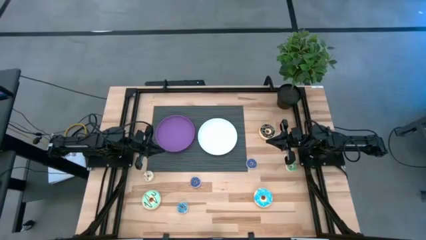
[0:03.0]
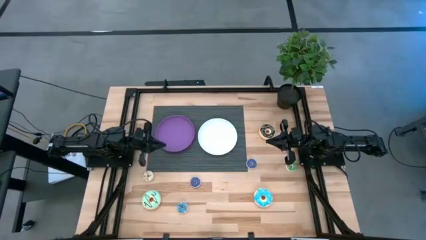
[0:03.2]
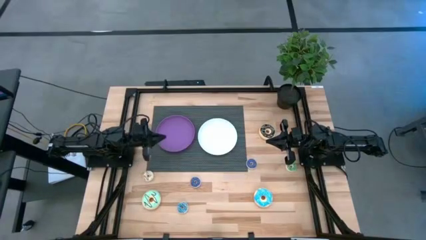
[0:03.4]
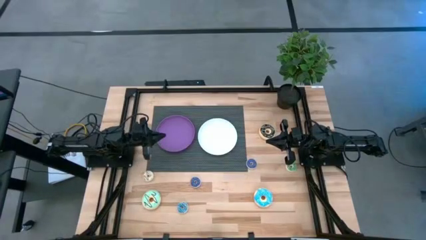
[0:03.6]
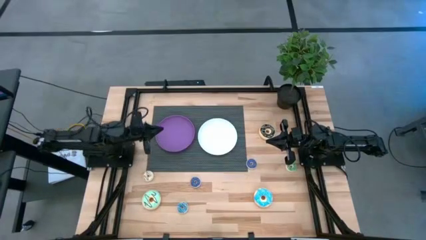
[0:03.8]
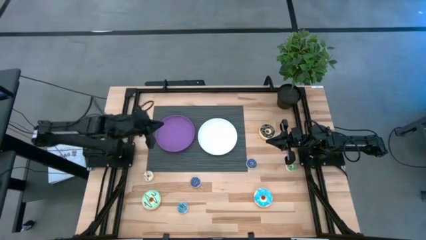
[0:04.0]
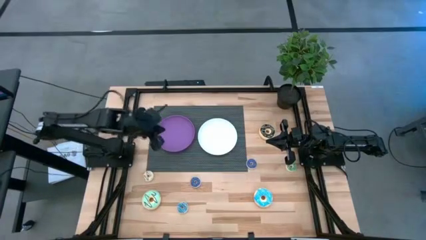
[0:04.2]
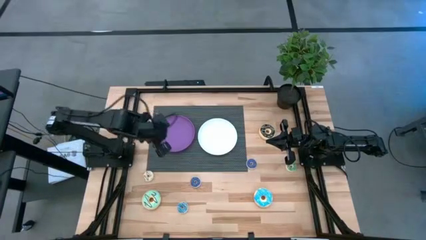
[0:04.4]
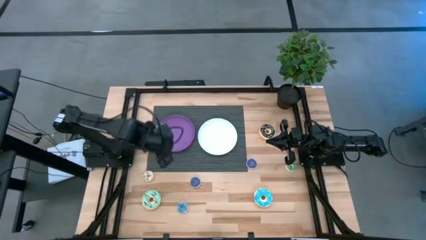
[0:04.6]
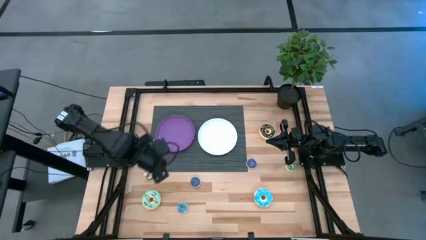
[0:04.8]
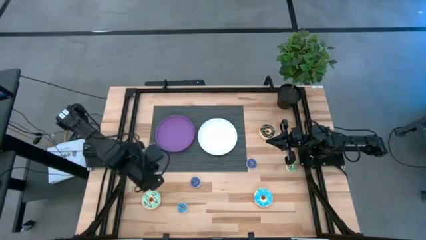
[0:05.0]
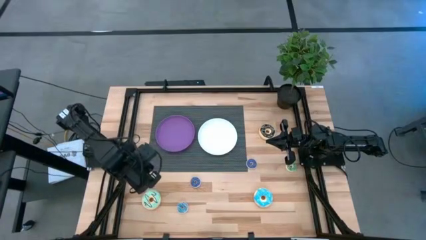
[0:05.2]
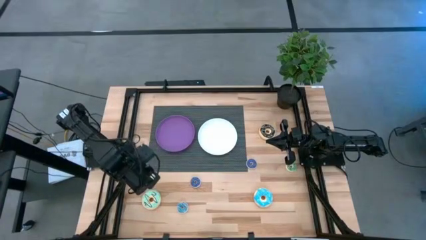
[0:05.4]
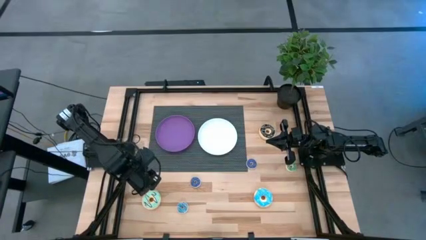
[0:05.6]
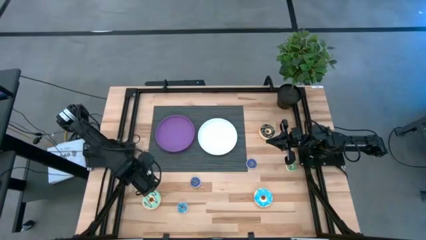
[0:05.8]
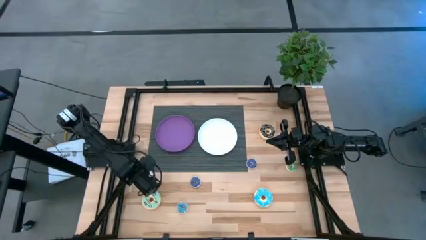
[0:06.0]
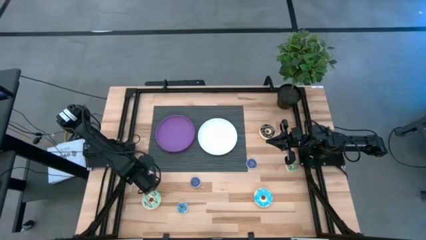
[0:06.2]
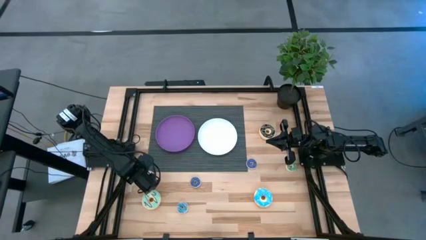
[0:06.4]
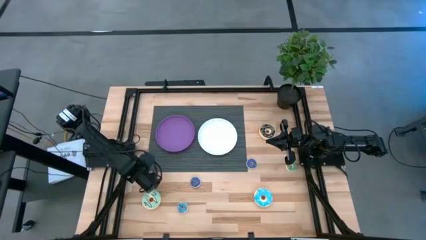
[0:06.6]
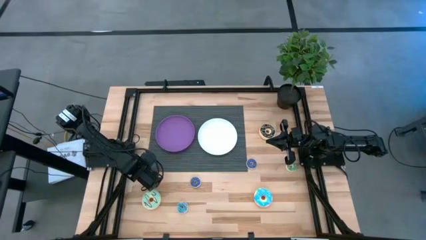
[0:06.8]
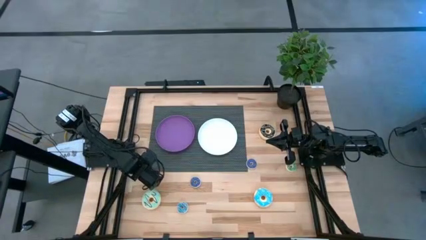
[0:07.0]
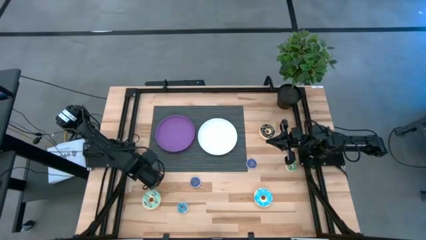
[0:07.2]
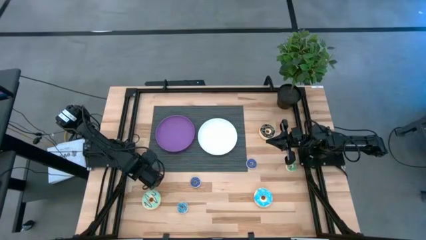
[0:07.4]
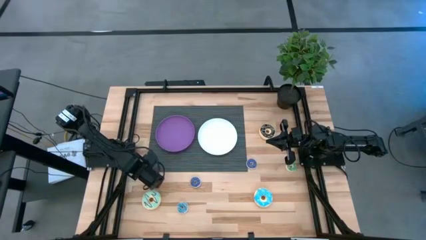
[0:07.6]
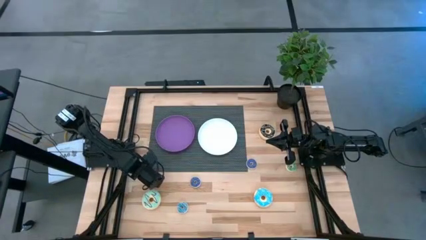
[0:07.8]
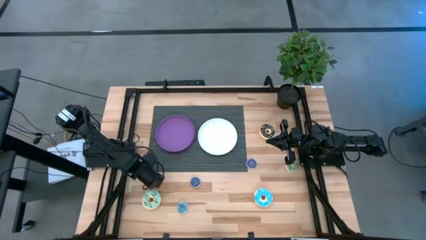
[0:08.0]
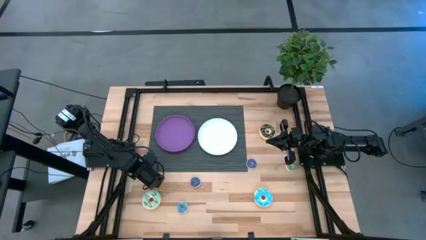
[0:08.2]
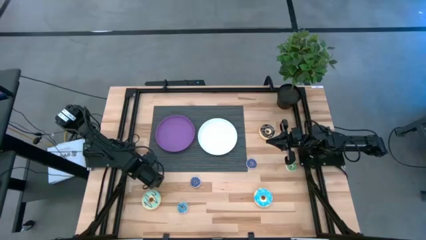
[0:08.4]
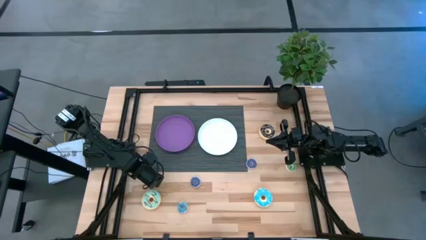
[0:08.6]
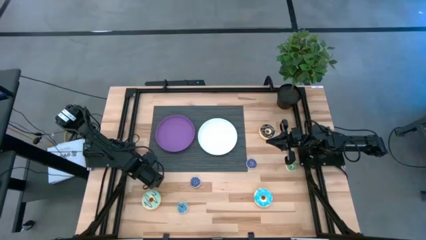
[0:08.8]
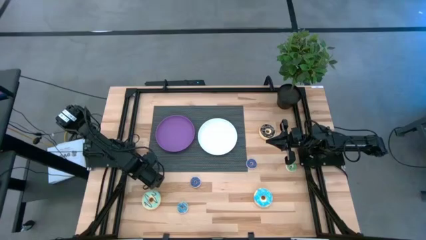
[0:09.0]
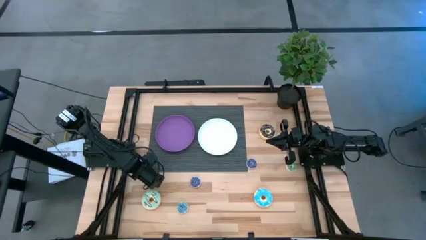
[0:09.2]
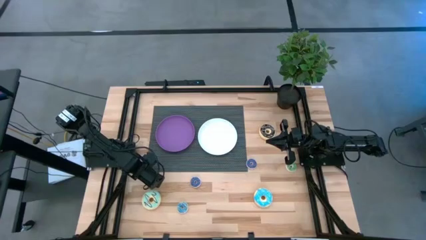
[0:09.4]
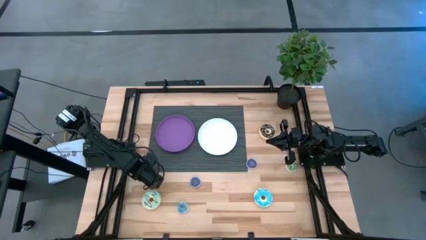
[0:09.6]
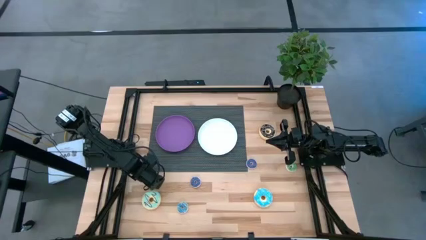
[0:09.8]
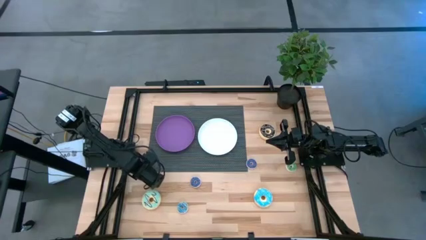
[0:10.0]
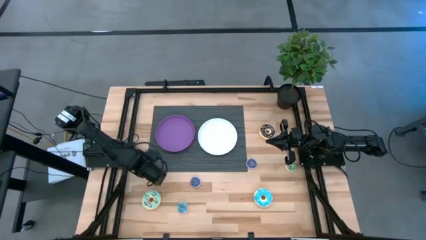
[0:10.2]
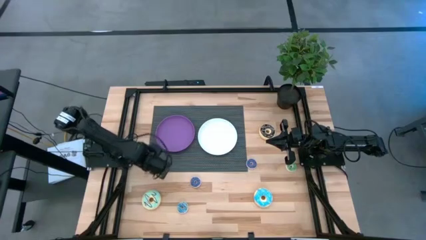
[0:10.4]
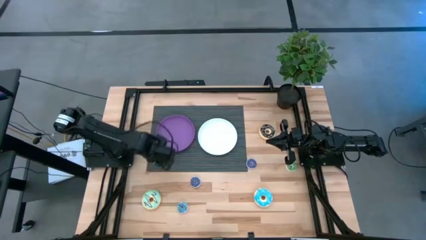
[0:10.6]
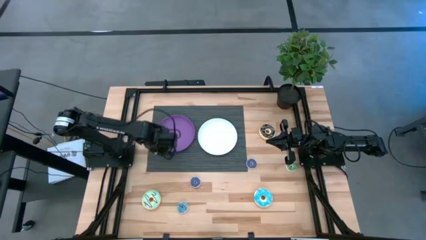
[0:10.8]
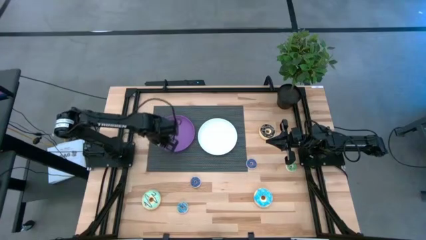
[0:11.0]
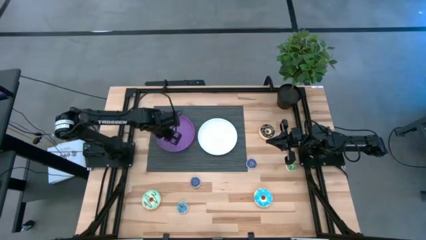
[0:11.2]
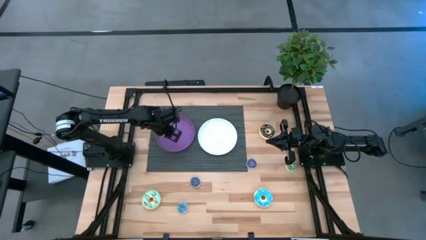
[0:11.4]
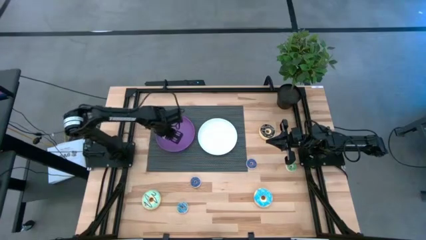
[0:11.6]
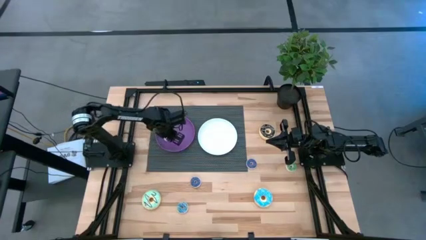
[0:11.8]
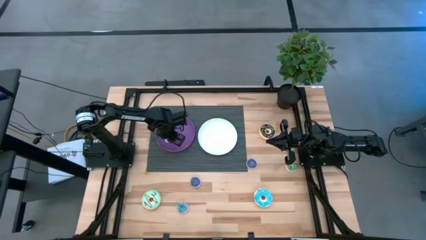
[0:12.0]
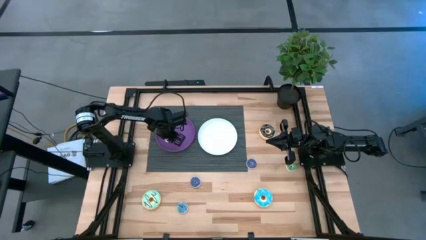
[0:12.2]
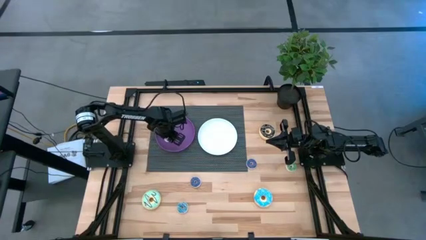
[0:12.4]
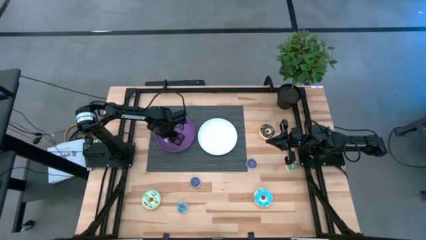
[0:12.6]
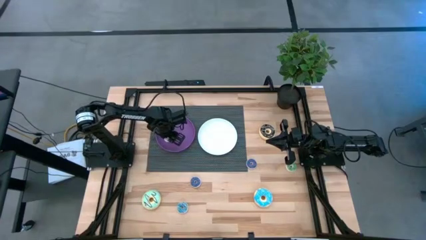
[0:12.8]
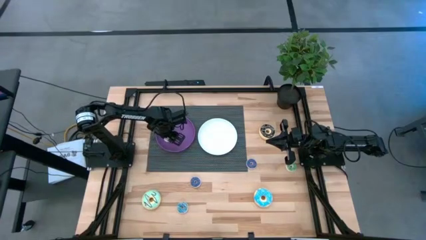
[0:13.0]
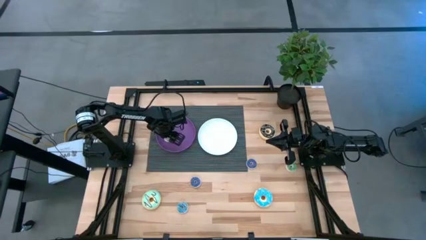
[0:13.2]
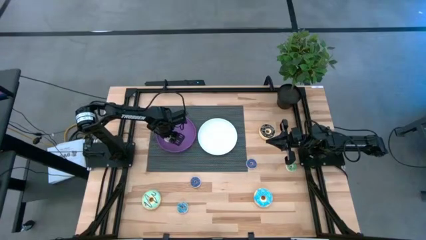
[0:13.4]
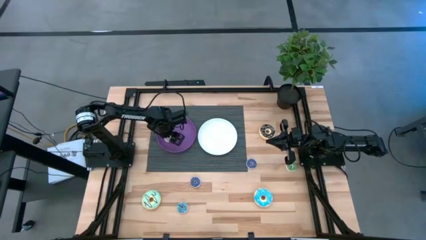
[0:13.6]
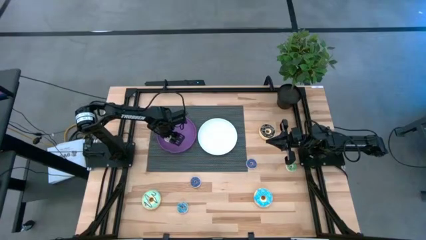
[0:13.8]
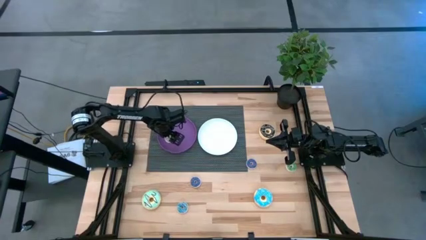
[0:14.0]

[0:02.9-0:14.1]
Task: Pick & Place donuts
Put the small light yellow donut on the purple plate
